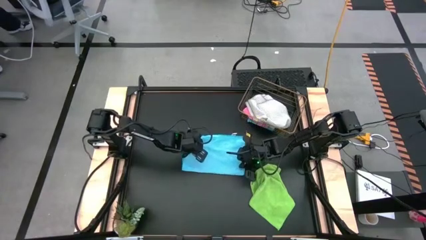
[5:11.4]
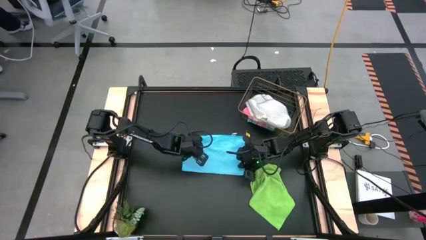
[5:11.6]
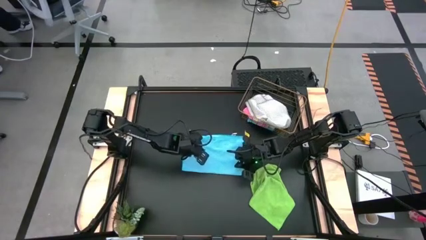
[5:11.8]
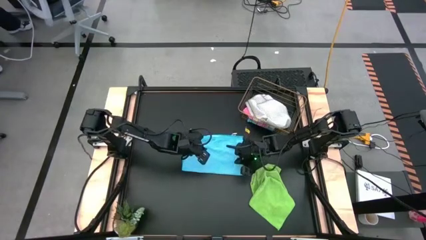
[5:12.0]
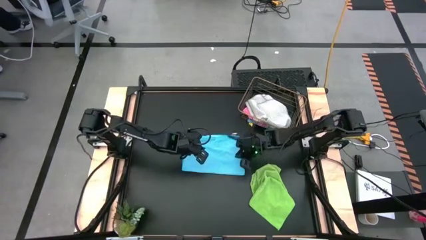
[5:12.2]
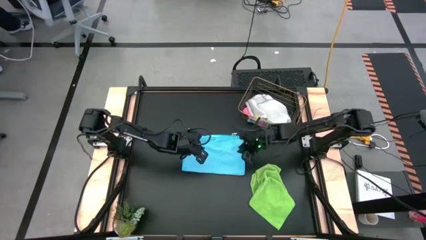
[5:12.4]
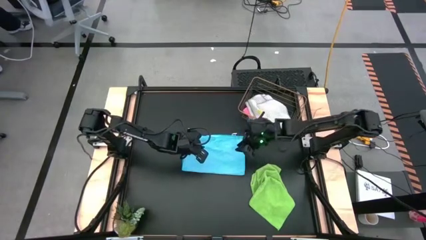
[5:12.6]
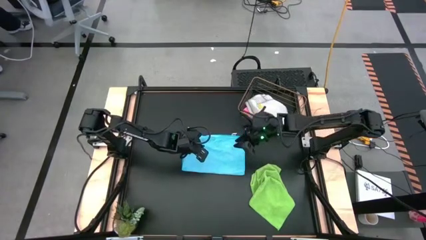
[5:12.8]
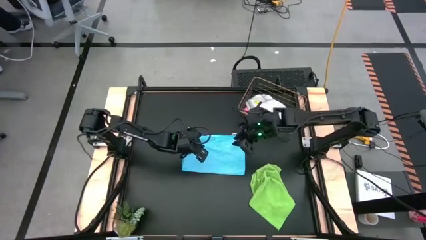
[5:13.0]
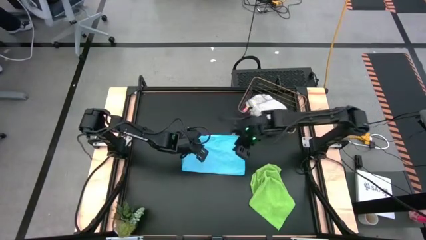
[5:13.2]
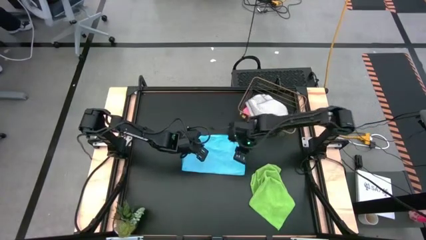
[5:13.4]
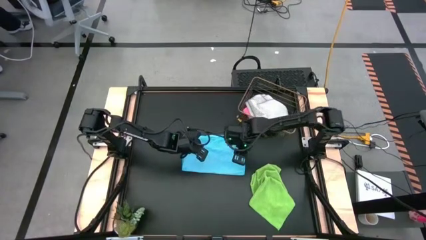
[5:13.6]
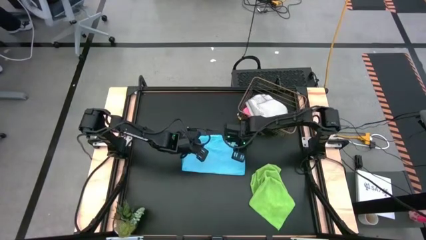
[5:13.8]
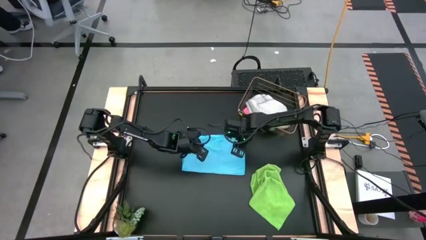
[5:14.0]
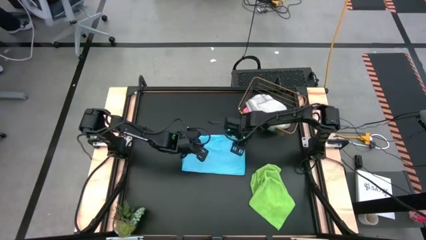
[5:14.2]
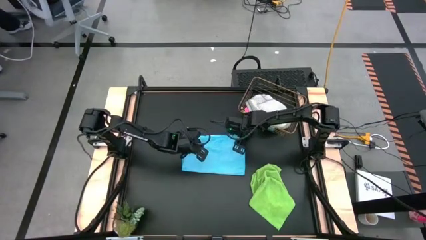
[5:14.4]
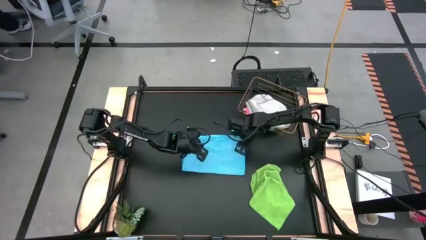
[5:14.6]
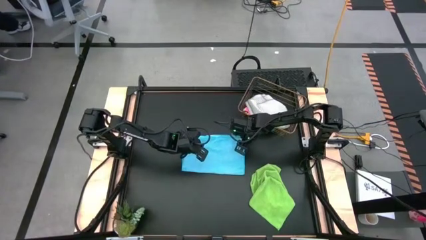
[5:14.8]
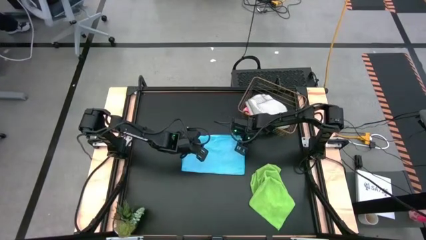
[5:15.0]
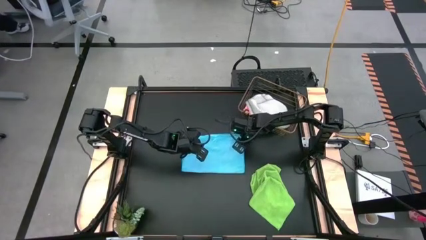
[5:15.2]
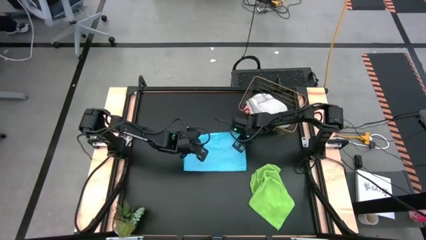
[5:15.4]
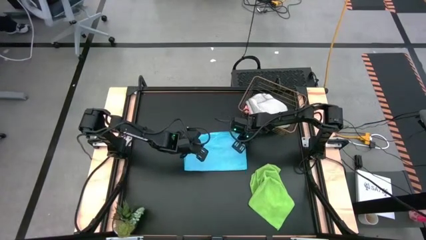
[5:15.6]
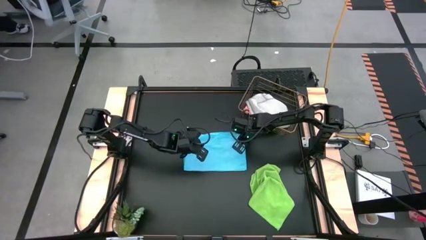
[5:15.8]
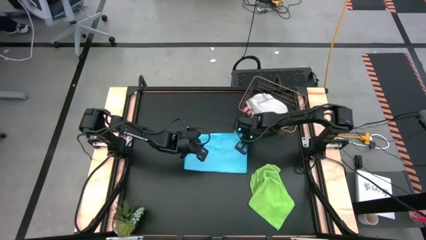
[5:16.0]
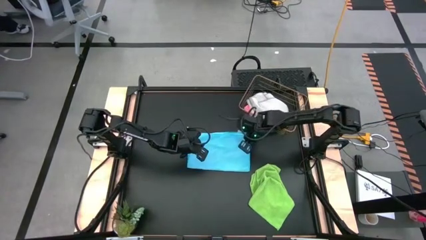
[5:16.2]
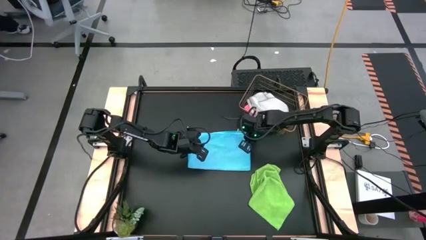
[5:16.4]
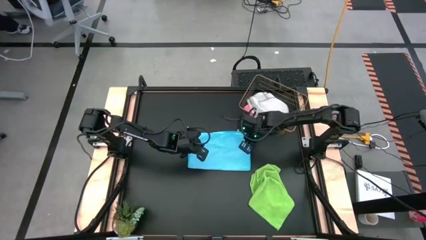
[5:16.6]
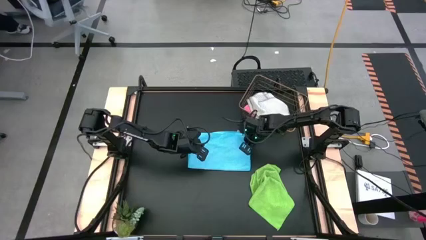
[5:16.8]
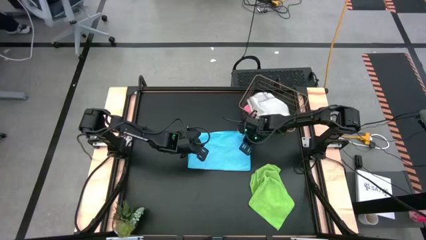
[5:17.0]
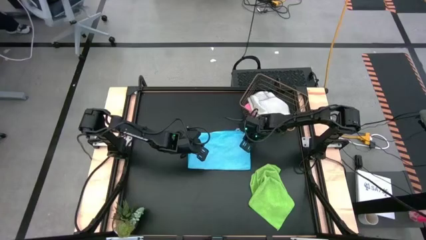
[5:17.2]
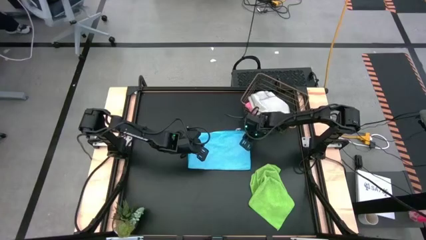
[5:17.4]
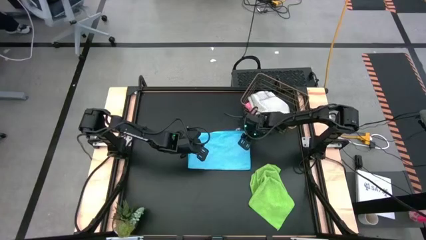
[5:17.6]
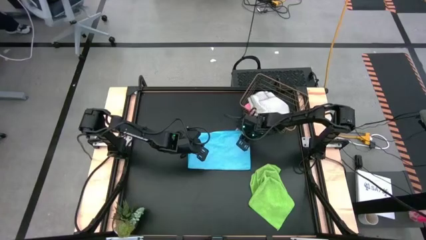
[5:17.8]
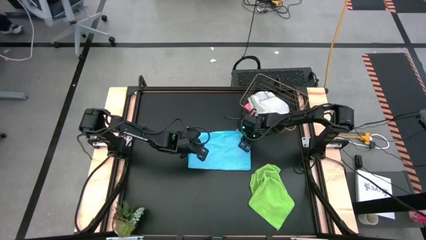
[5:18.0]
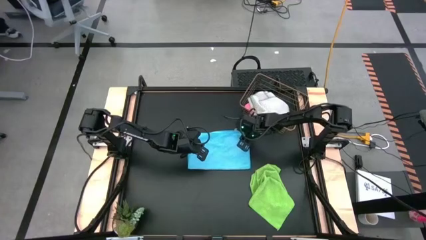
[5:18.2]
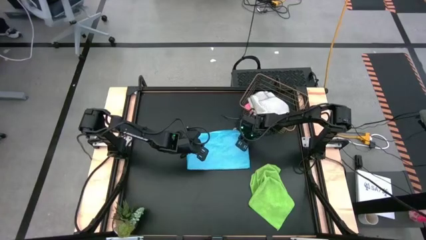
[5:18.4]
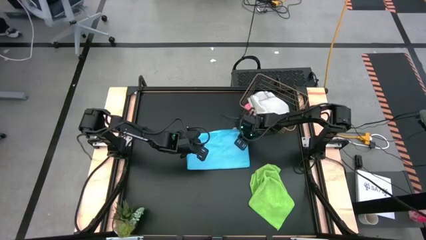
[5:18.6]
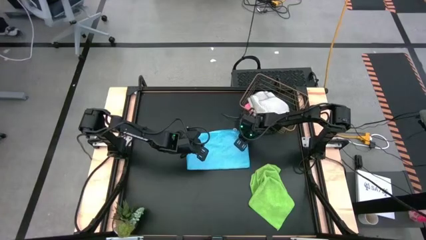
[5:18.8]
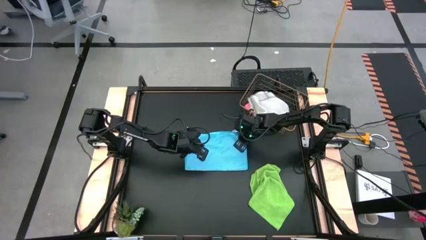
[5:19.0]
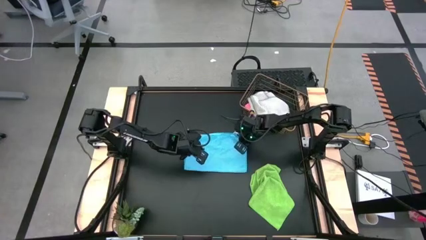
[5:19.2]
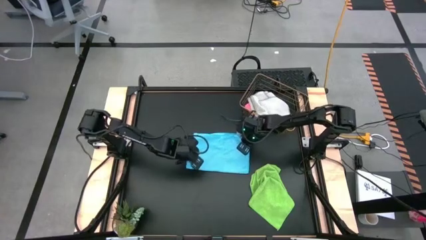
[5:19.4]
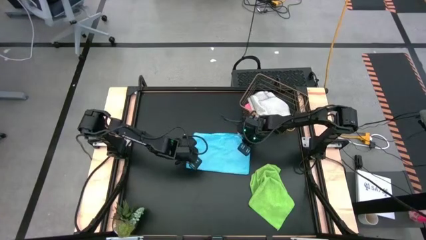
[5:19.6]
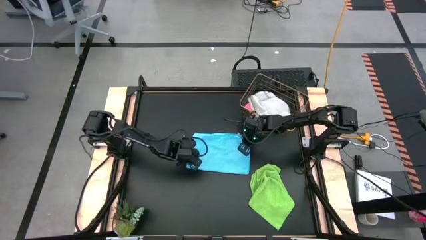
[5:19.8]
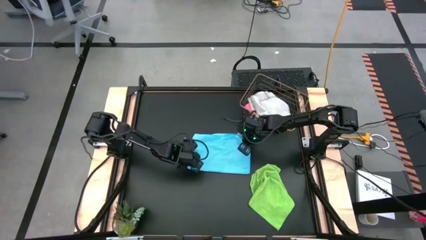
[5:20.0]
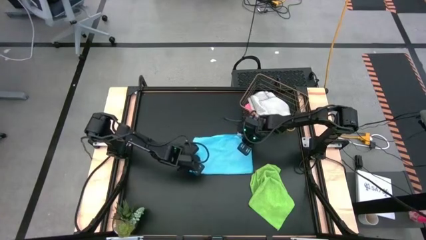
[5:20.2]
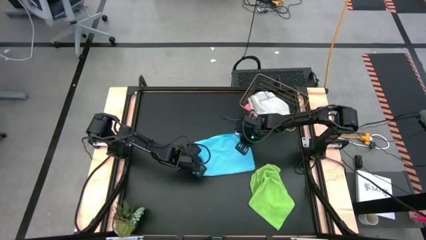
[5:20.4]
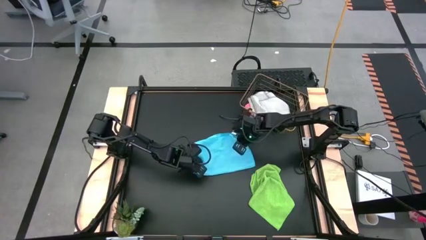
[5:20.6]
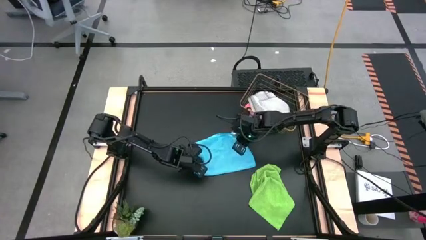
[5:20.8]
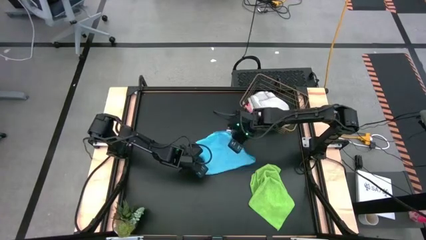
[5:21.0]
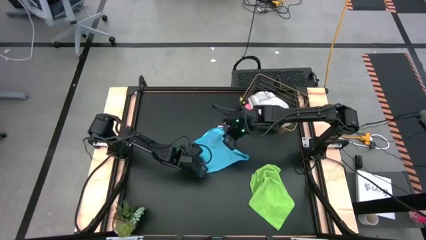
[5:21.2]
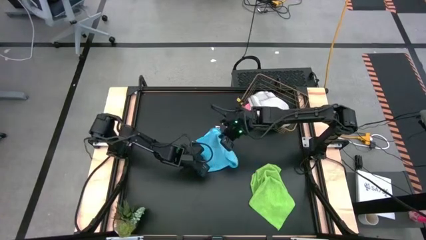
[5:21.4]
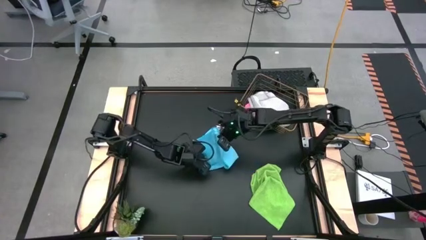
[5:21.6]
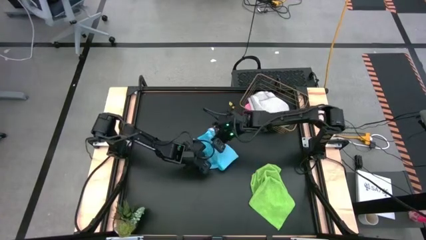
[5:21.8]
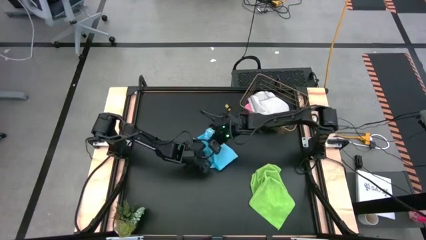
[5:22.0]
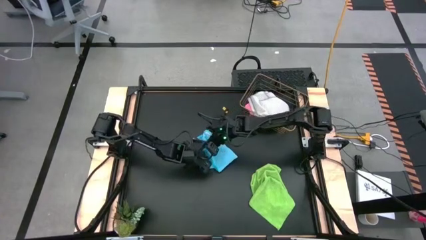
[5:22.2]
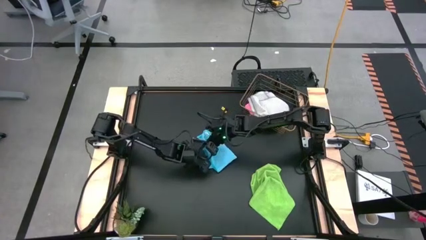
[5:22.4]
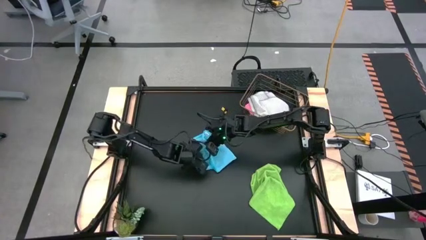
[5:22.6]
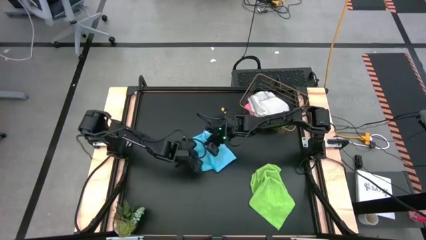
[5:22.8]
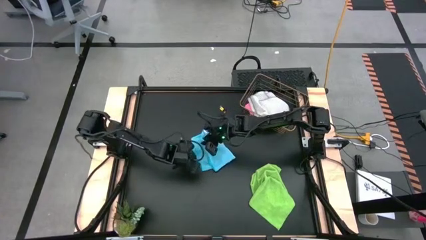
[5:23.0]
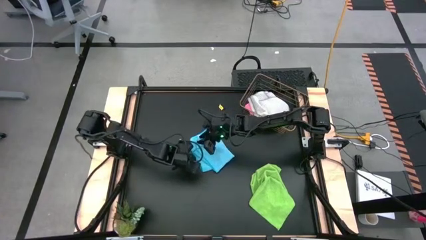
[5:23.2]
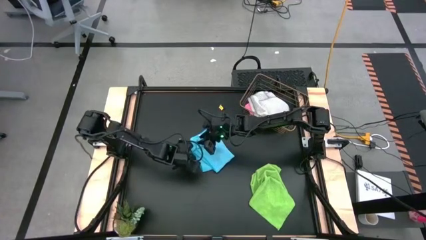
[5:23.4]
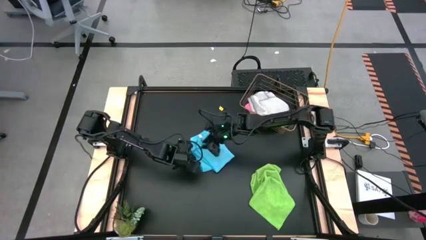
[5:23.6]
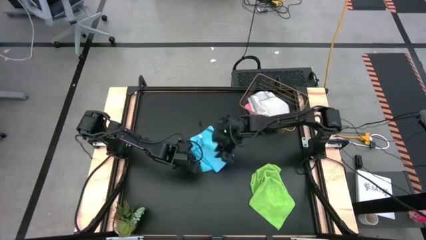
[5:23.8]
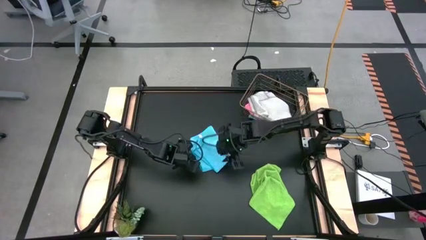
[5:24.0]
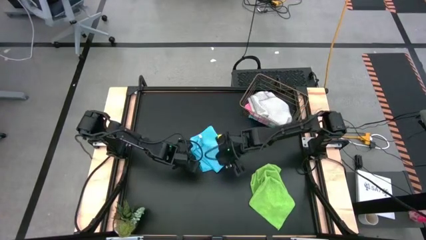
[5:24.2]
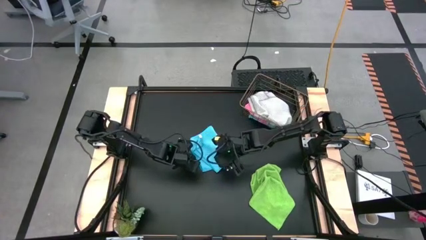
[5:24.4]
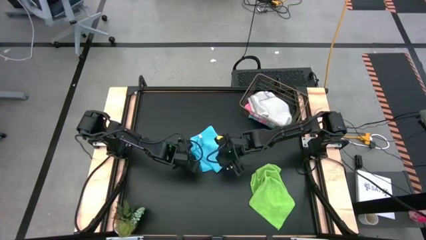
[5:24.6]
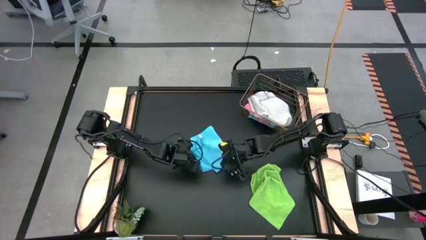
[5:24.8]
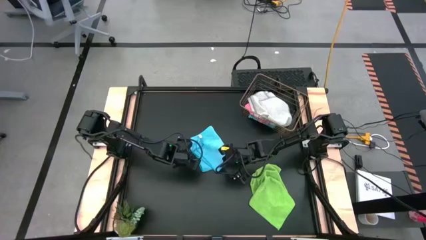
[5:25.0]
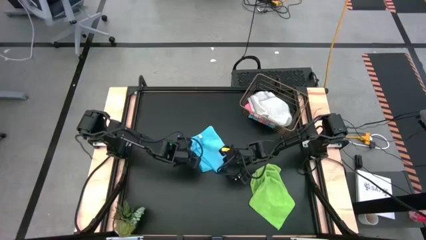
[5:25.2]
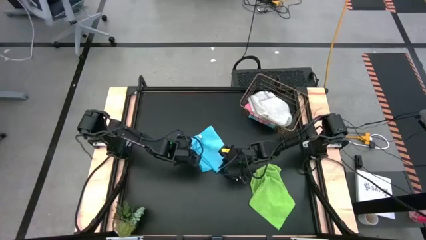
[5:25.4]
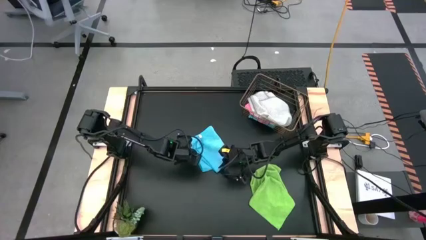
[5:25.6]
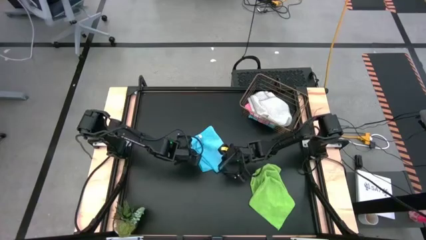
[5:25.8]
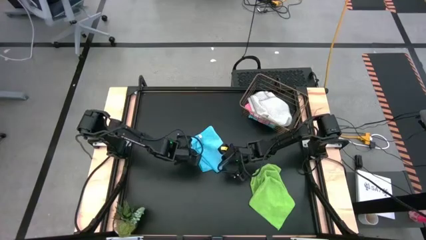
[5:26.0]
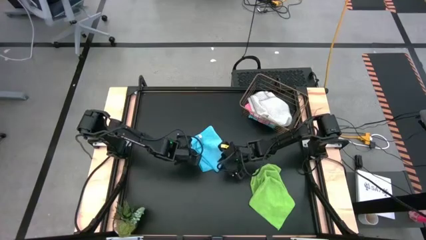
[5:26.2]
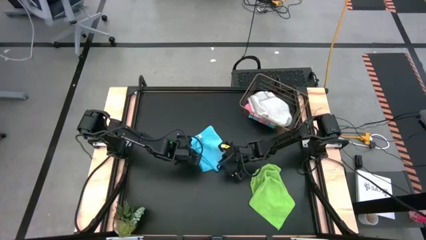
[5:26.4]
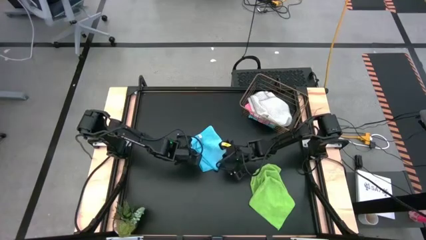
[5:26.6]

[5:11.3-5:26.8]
Task: Fold microfiber towels
Fold the blue towel

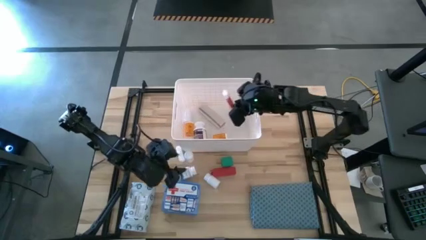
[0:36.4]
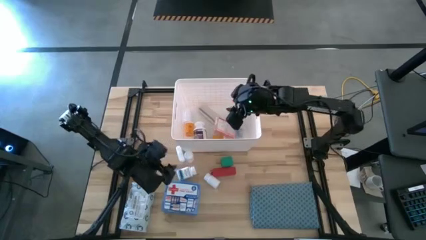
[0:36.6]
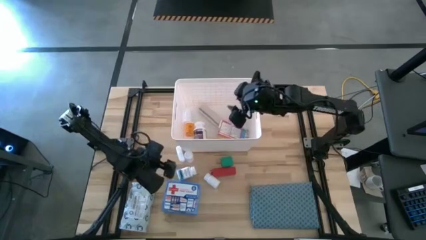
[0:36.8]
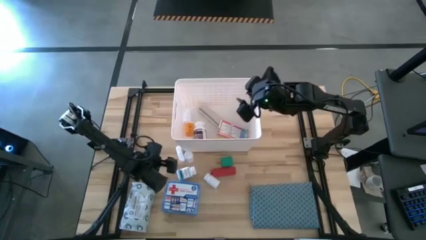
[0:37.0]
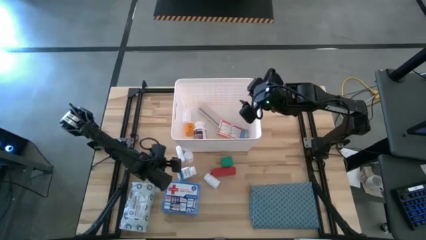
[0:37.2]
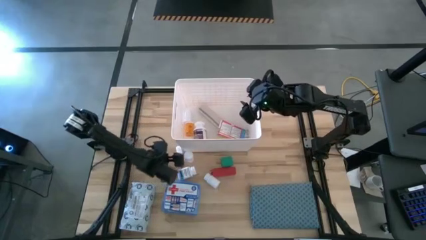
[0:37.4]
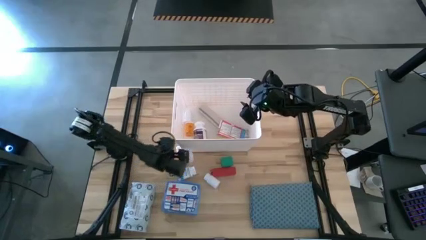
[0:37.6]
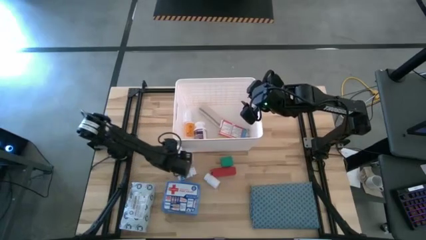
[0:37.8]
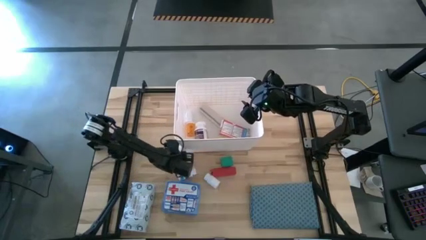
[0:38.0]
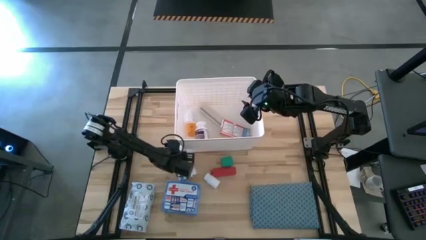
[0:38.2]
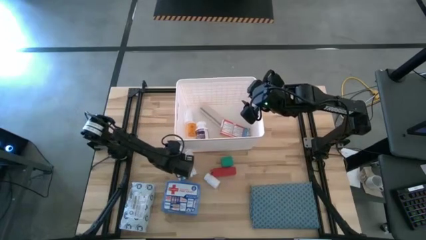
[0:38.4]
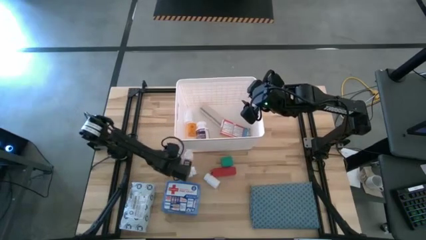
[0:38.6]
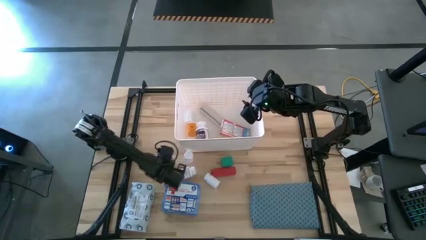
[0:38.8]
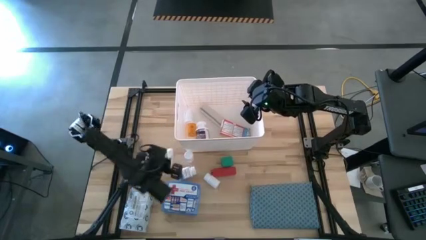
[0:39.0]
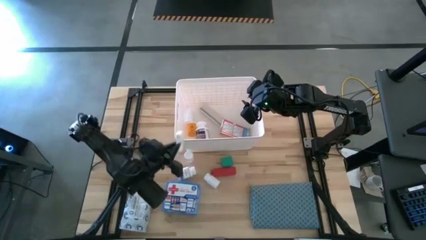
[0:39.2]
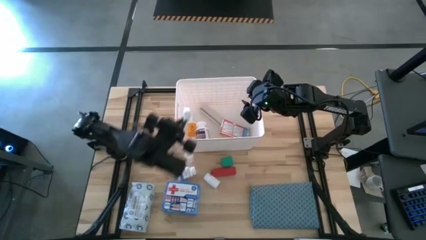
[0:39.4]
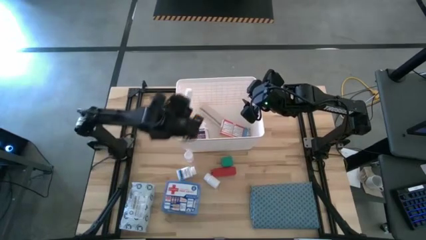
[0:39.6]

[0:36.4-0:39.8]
Task: Pick & place medical supplies in basket/bin
Put the white rolled gauze into the white bin
